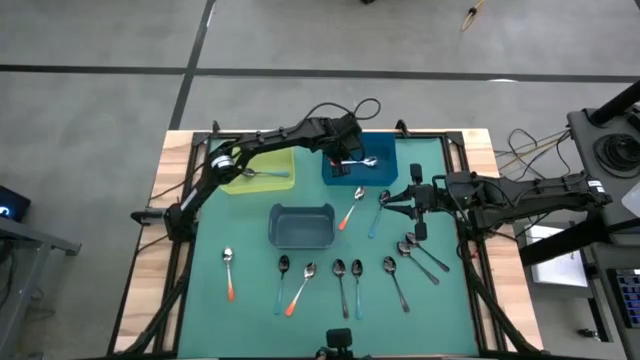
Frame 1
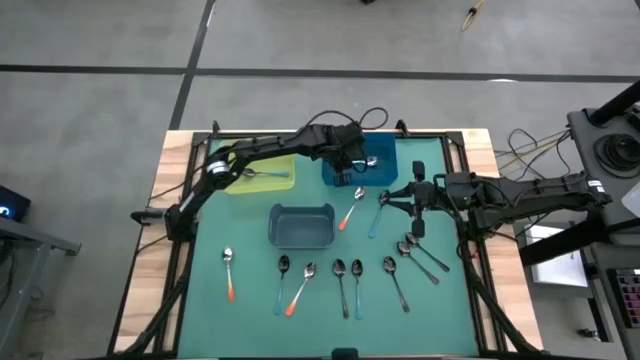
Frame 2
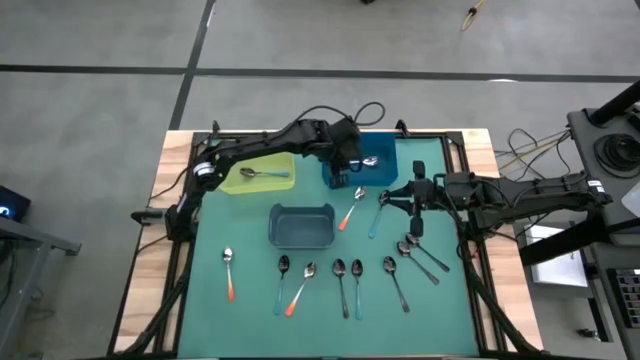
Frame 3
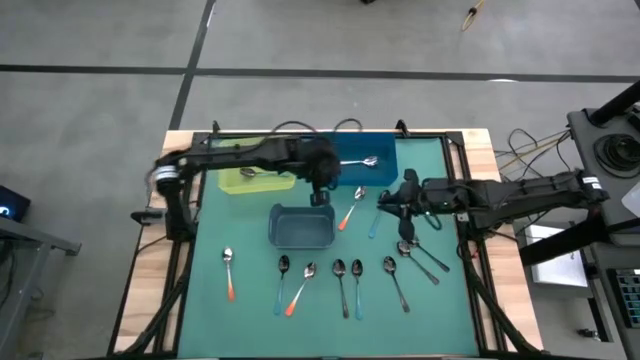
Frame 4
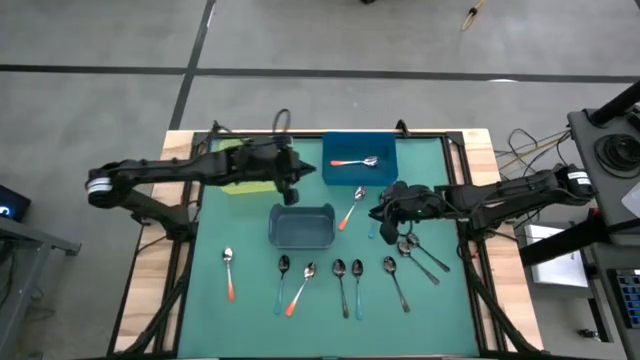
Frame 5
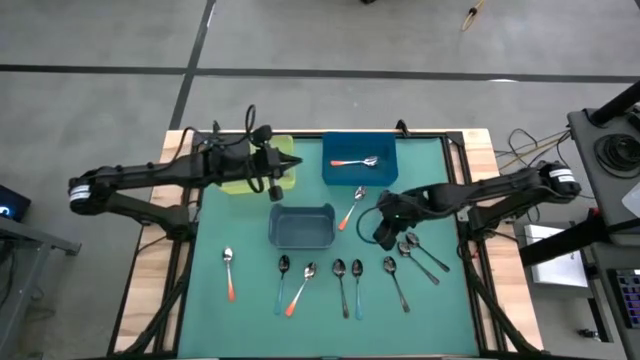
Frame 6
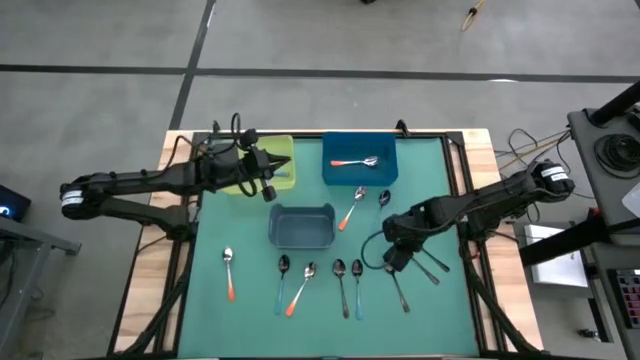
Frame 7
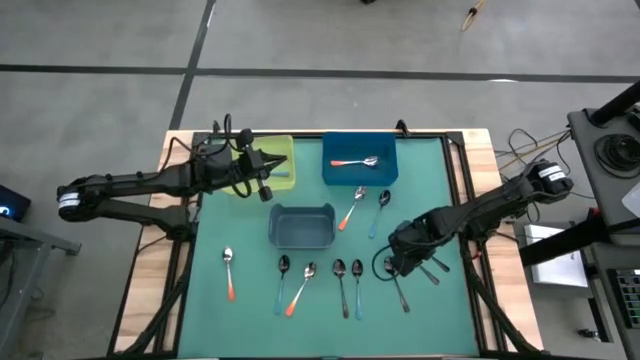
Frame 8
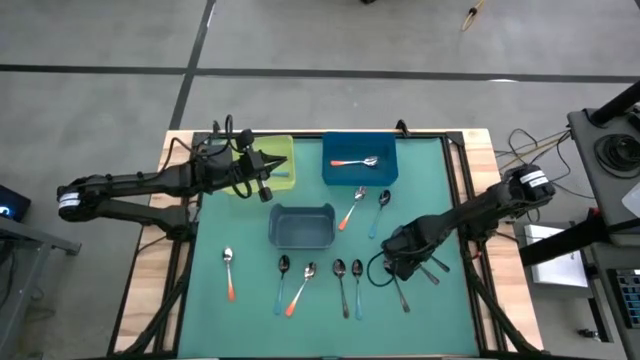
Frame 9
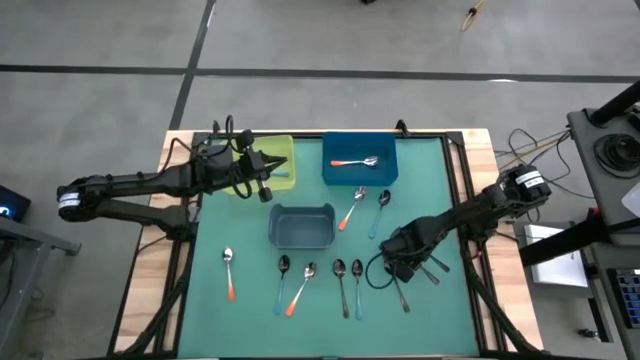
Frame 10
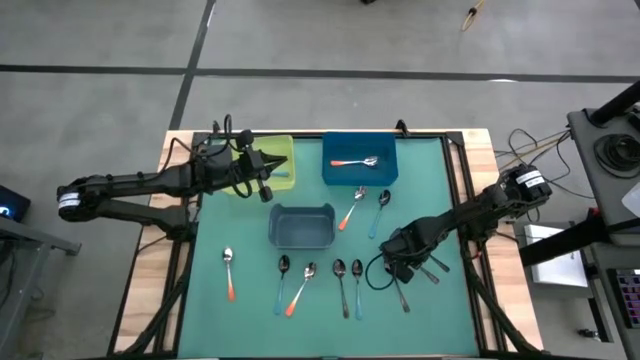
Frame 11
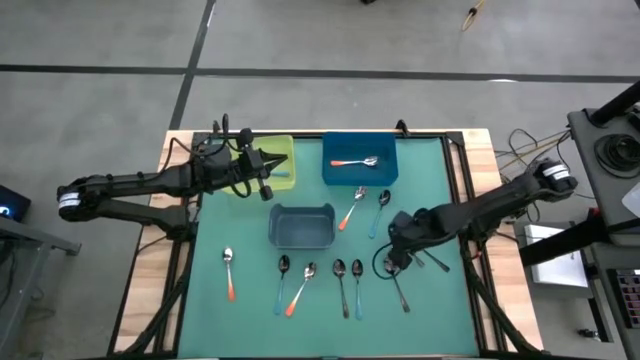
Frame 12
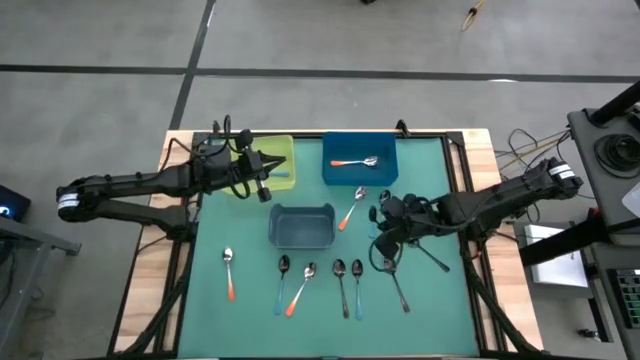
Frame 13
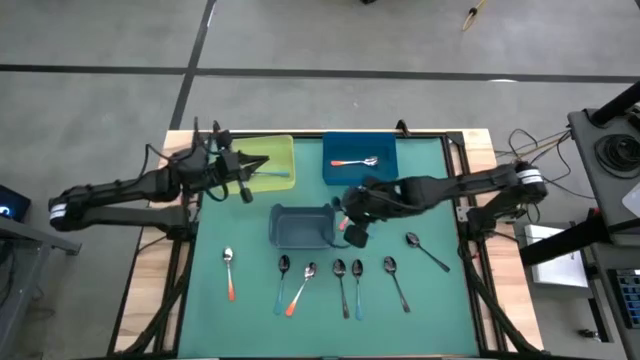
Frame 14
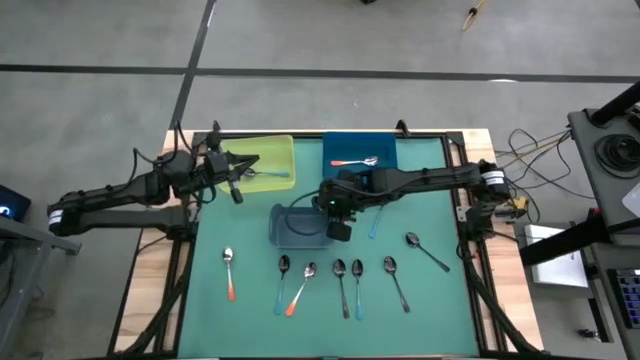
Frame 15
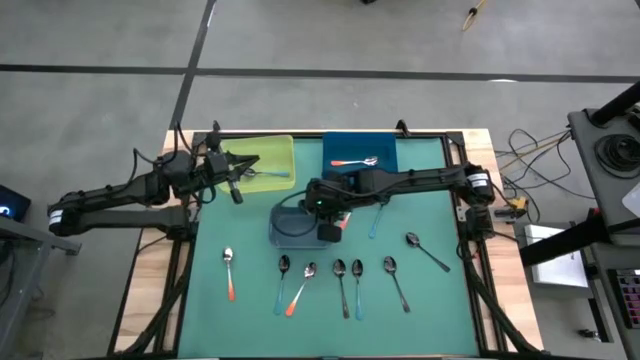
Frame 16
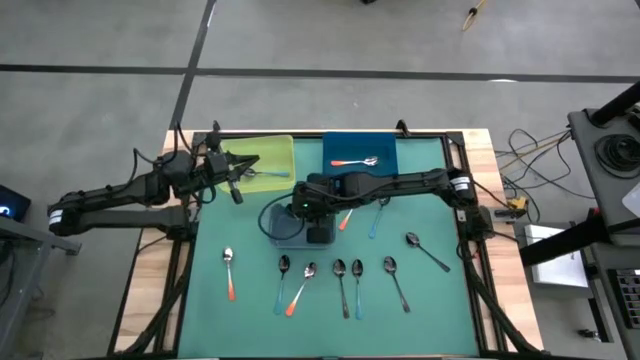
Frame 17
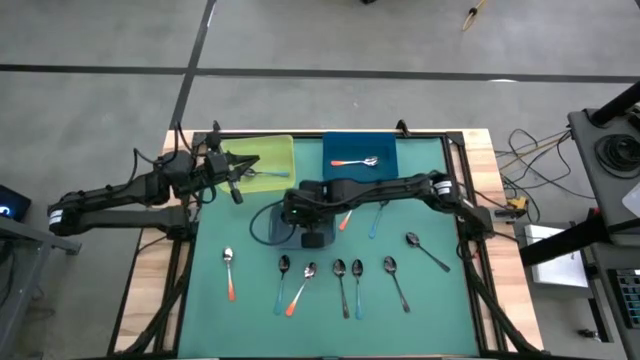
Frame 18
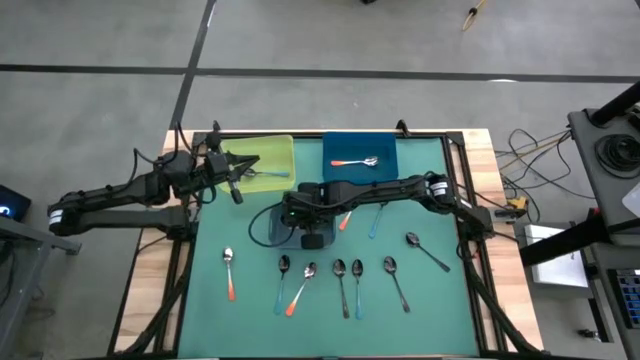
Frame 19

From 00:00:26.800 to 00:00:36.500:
Task: Sort silverware by color (type)
Put the black spoon into the gray bin

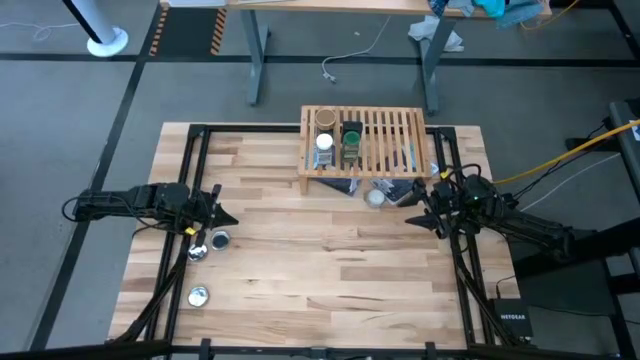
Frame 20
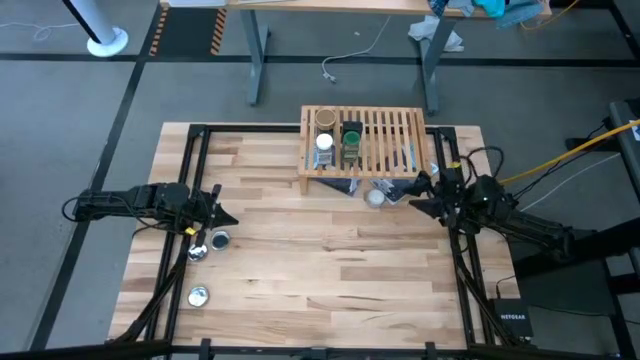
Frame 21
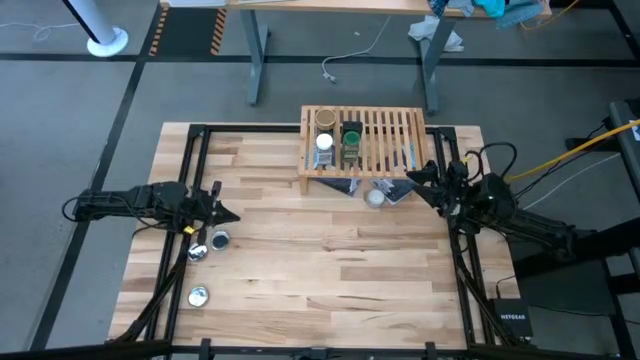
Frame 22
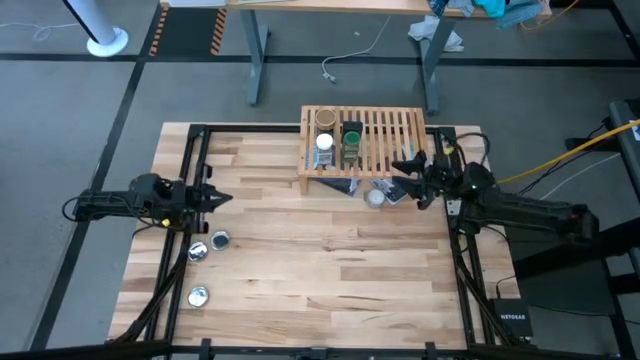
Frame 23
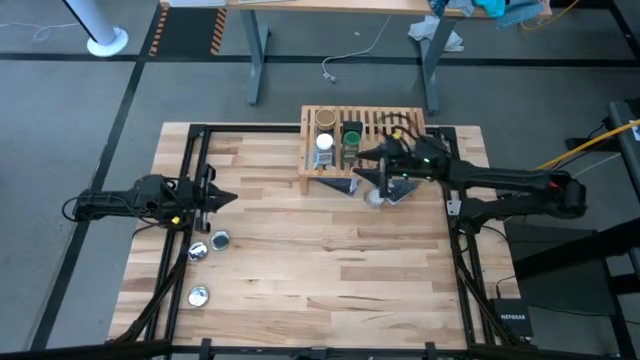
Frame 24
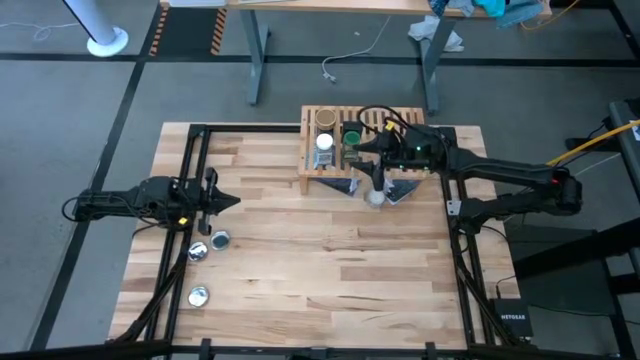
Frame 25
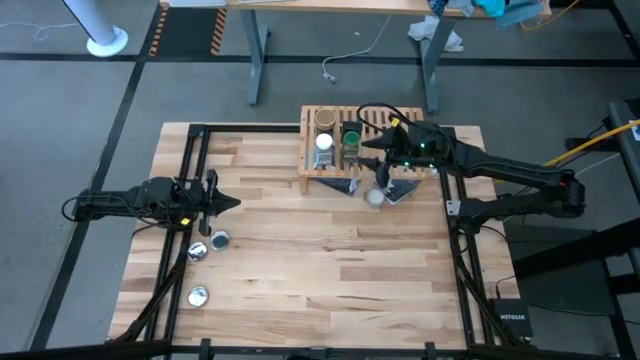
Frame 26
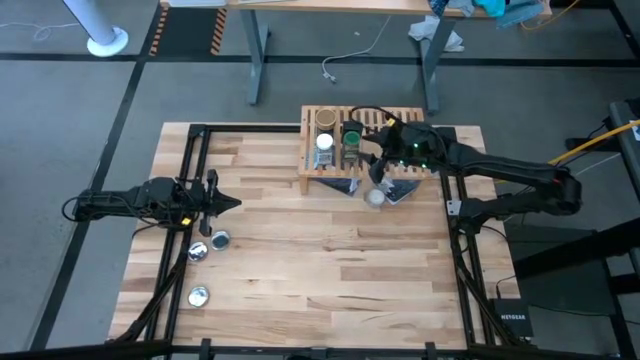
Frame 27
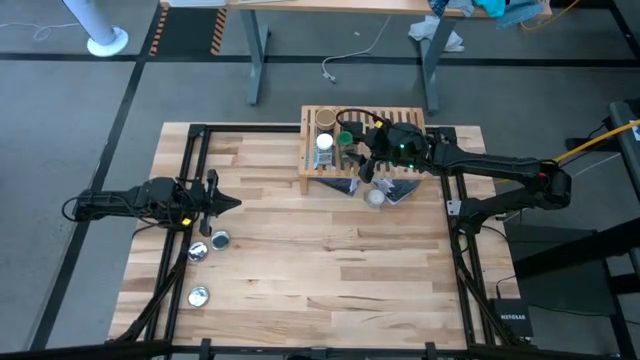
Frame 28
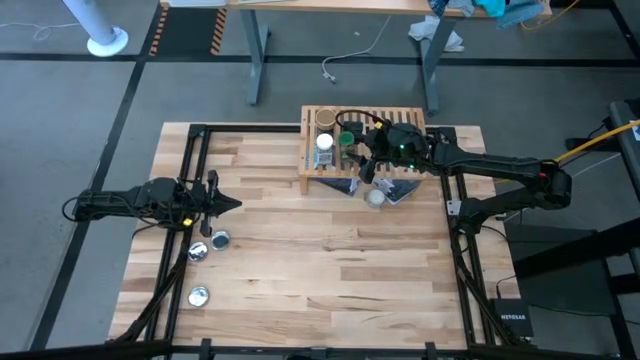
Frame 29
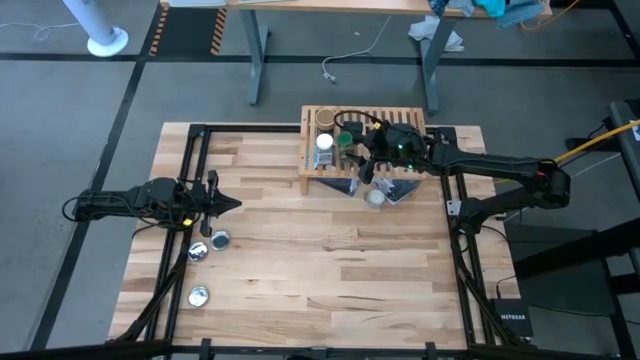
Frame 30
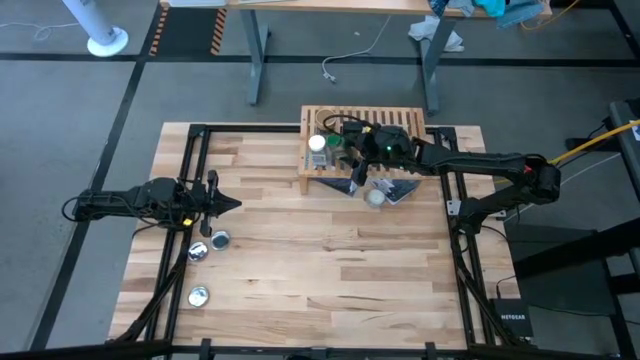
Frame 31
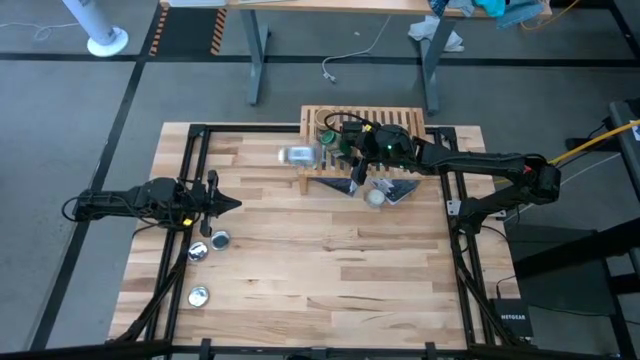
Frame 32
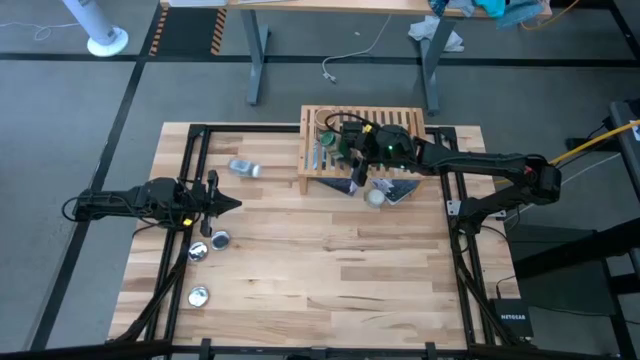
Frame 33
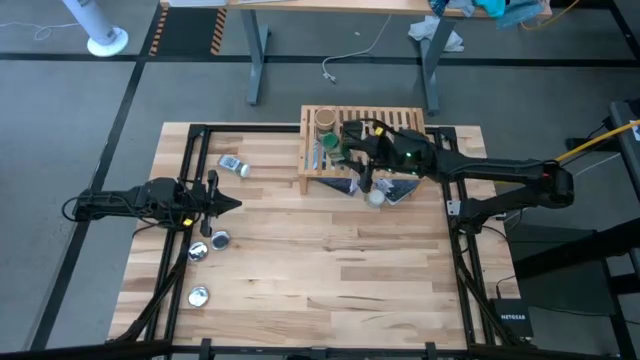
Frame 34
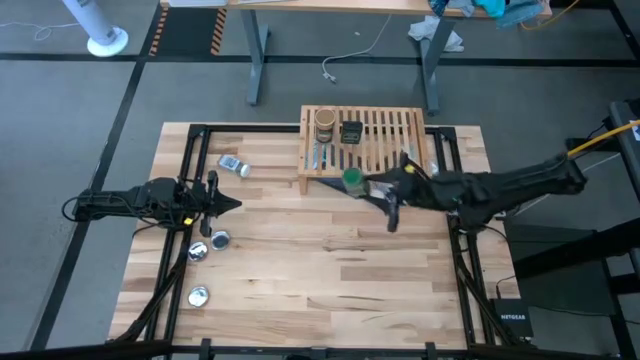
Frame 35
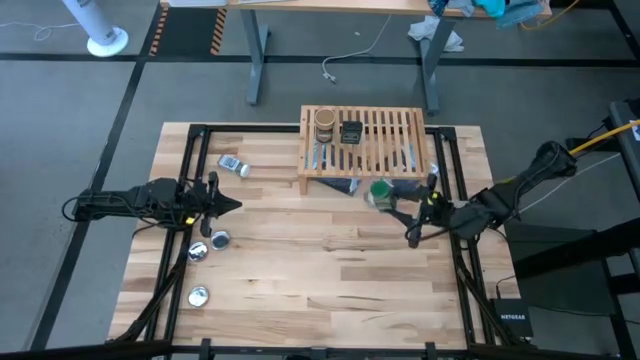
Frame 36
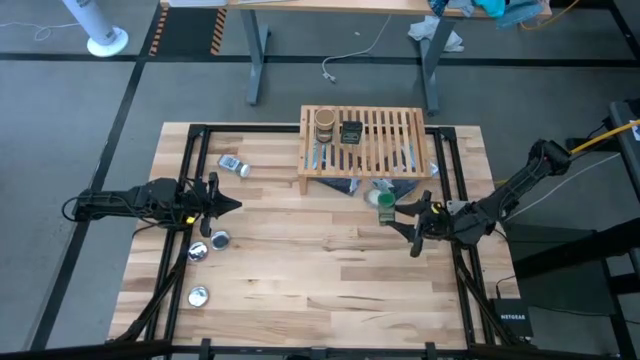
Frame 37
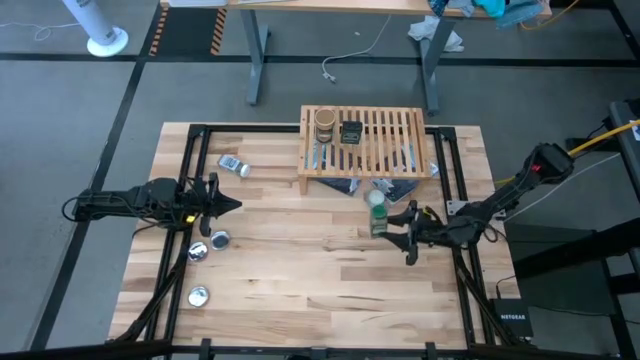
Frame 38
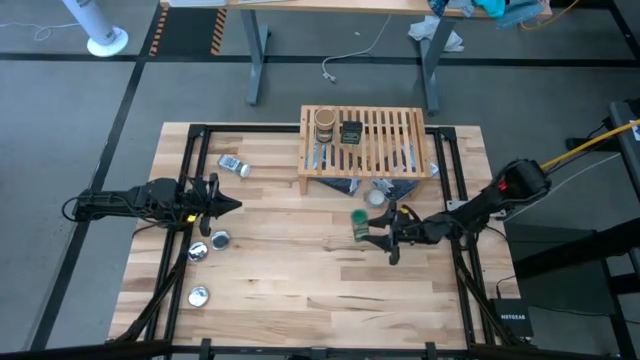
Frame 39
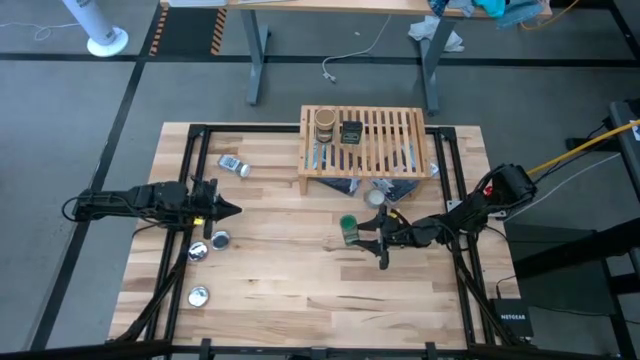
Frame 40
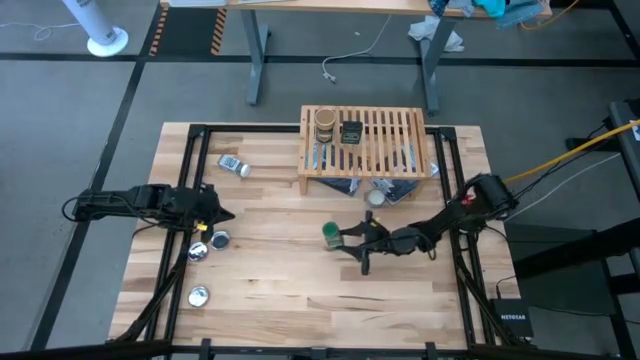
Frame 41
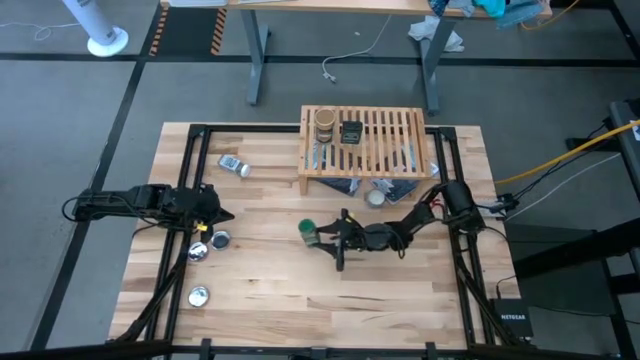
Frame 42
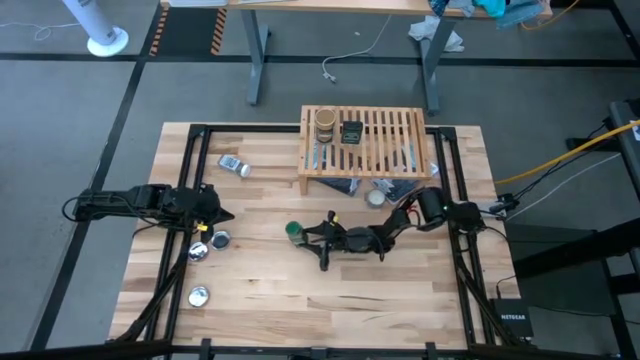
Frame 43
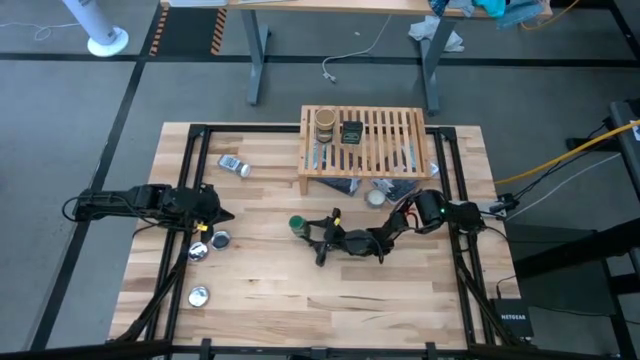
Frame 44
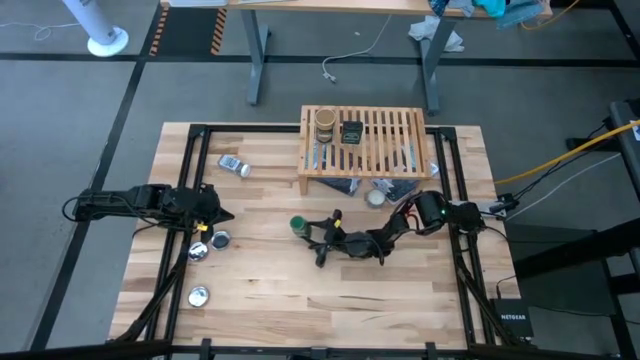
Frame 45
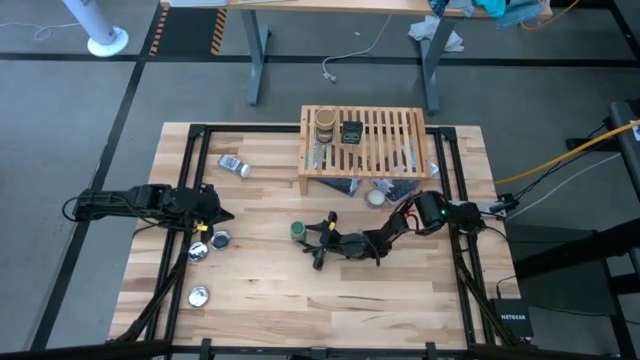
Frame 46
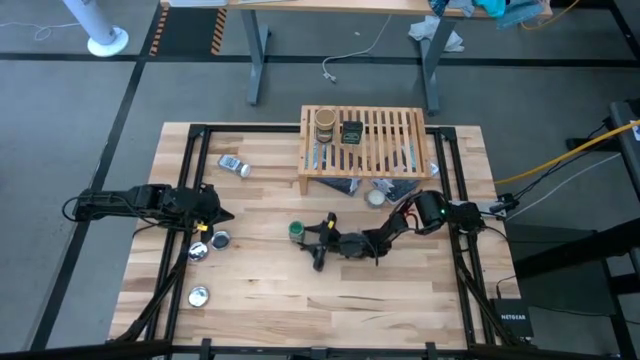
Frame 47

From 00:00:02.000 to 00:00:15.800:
Task: Shelf spices
Remove the green seasoning bottle from the shelf
